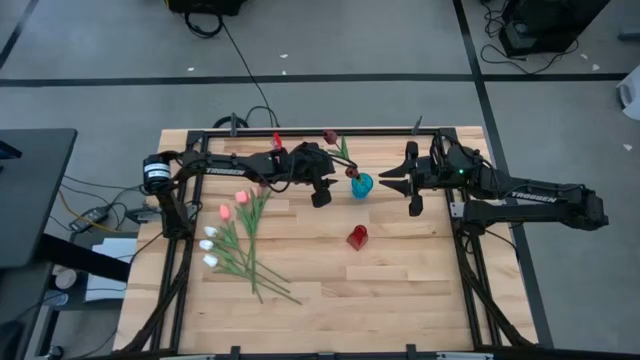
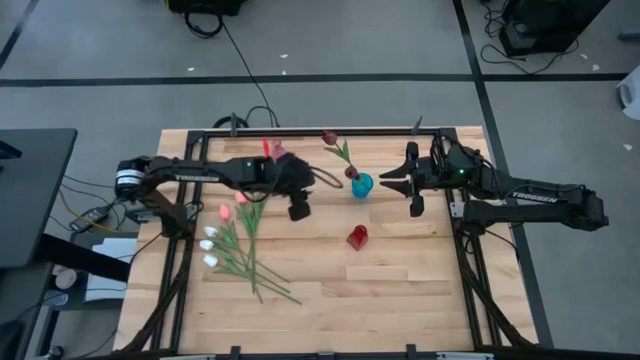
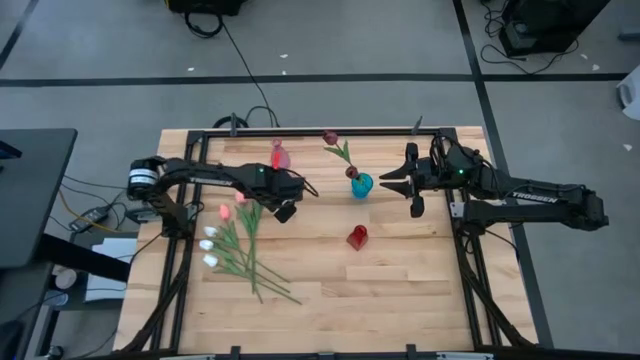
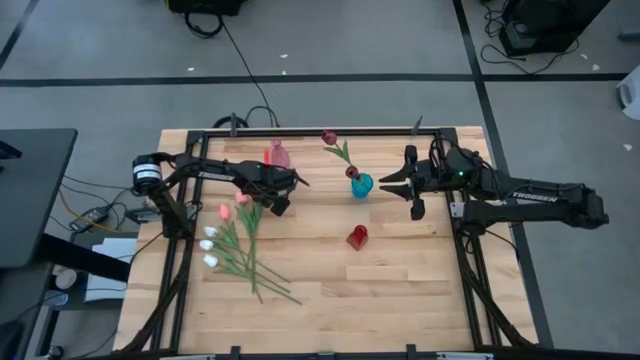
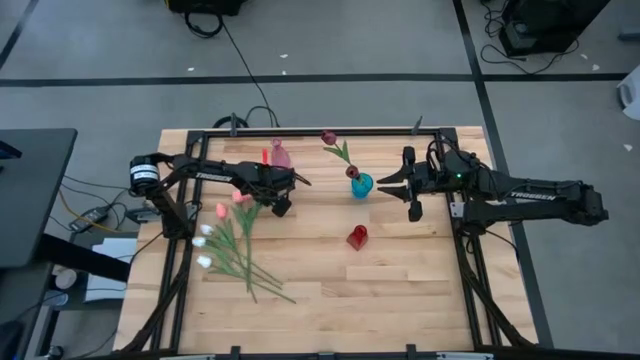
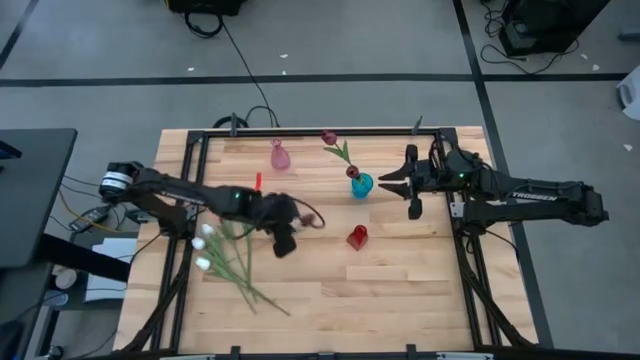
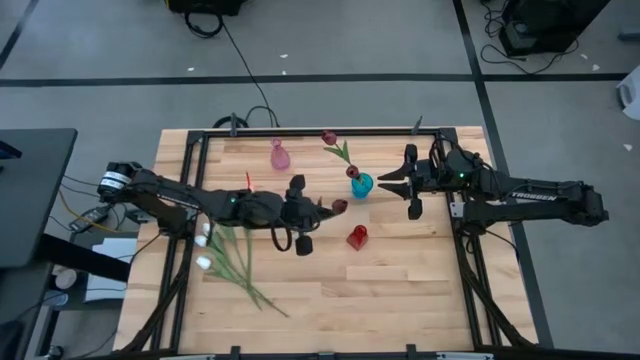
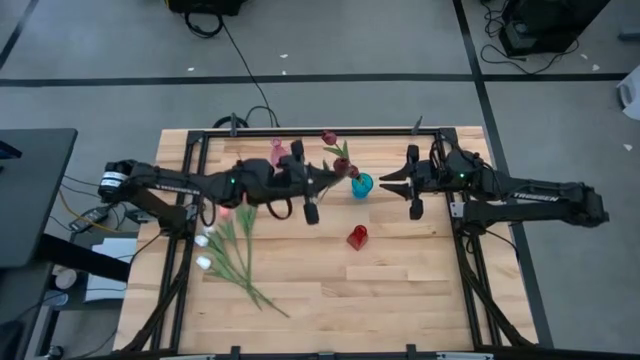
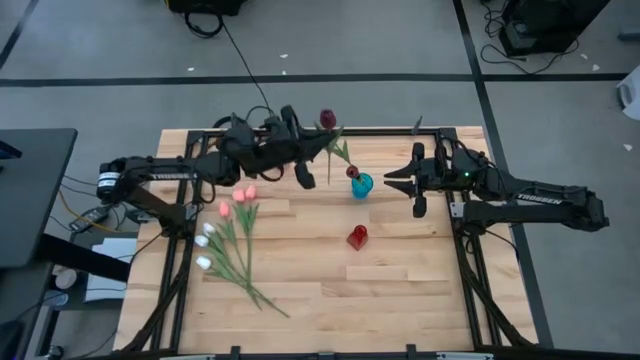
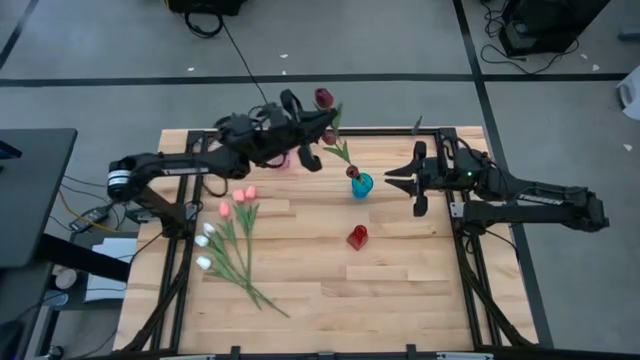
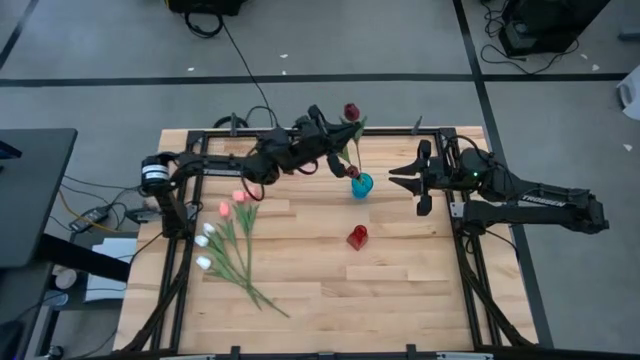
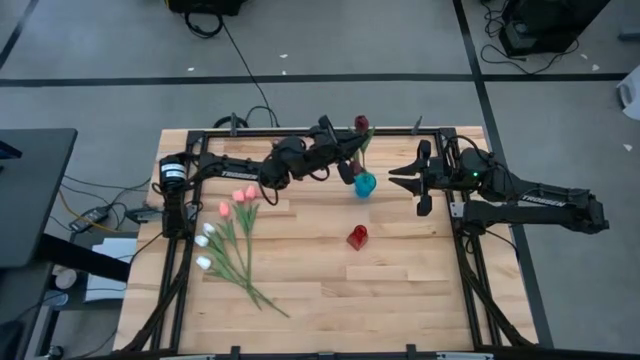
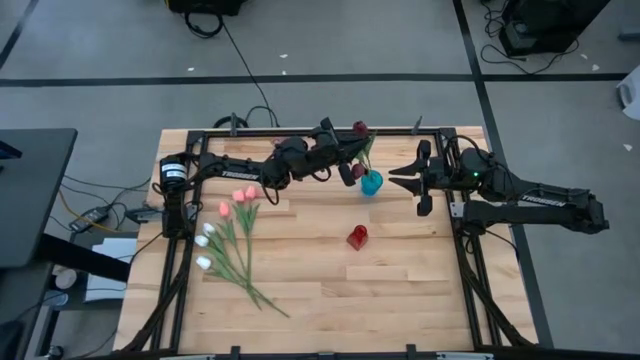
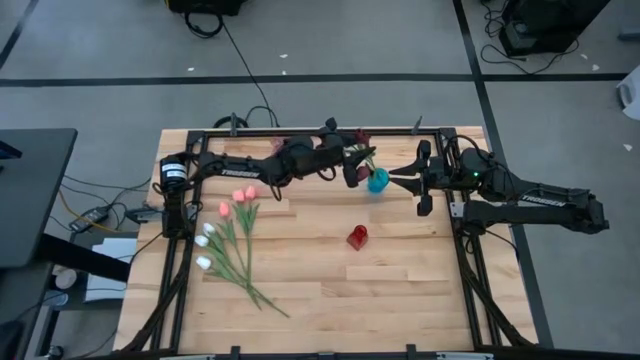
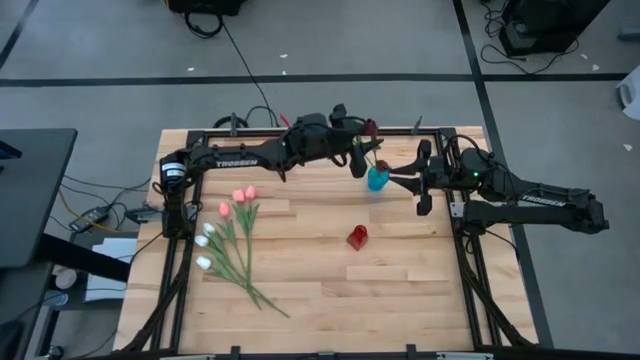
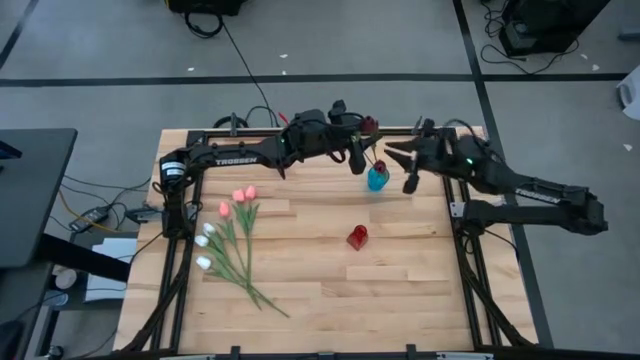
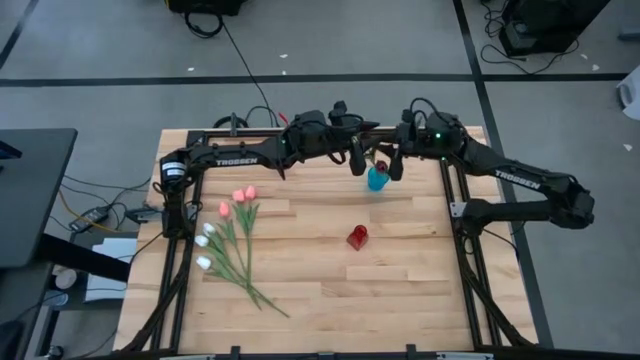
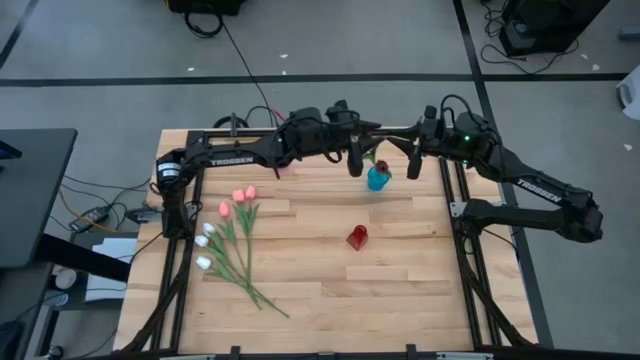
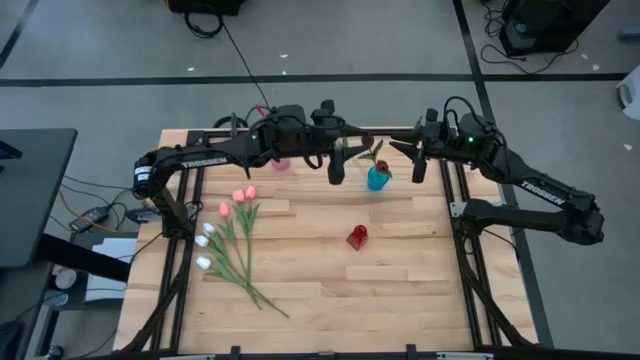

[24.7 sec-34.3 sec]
Task: Sort flowers into vase by color
Put the red tulip into the blue vase

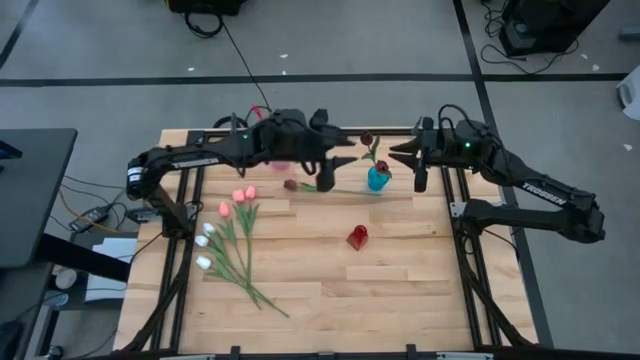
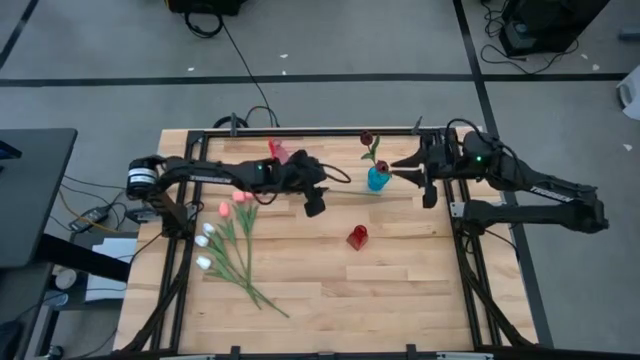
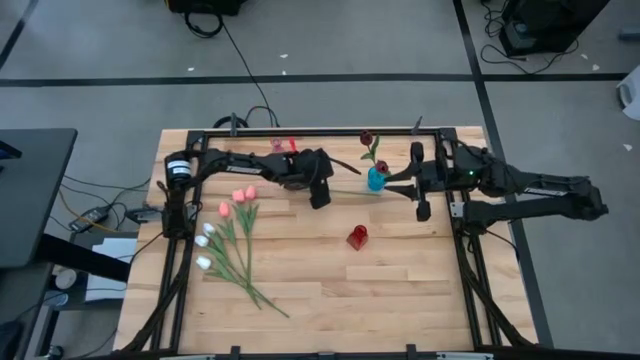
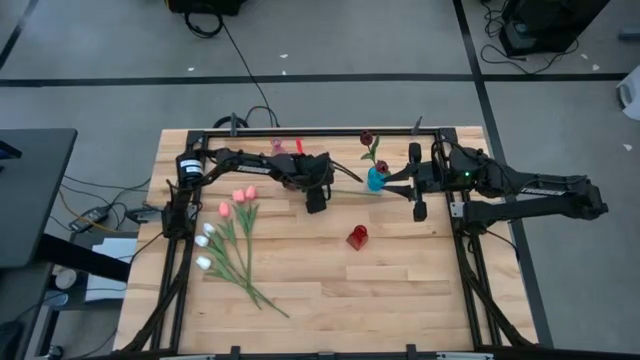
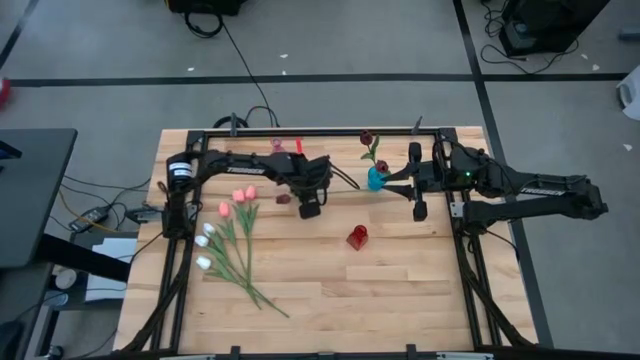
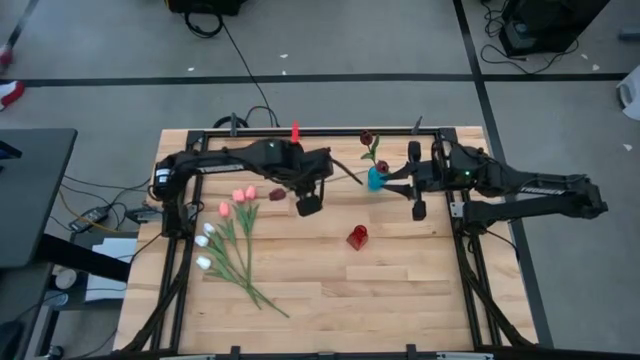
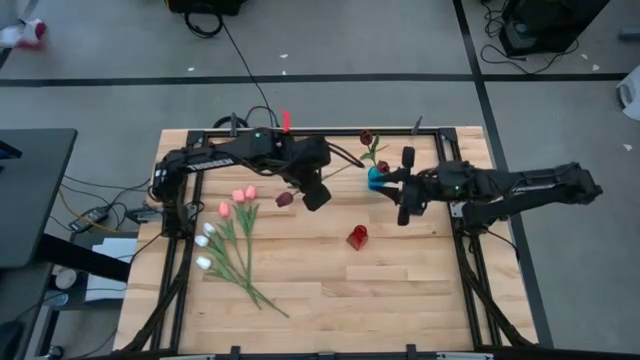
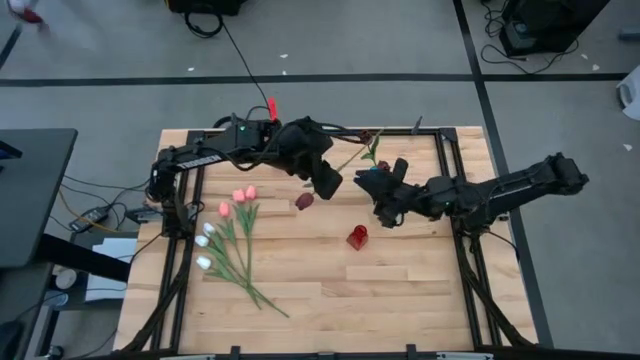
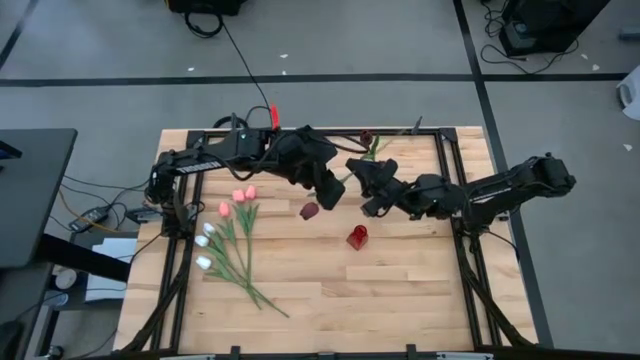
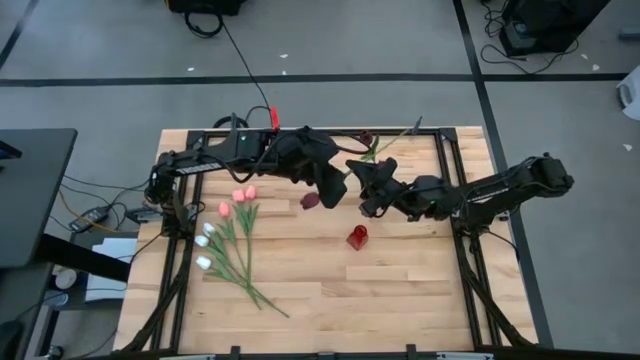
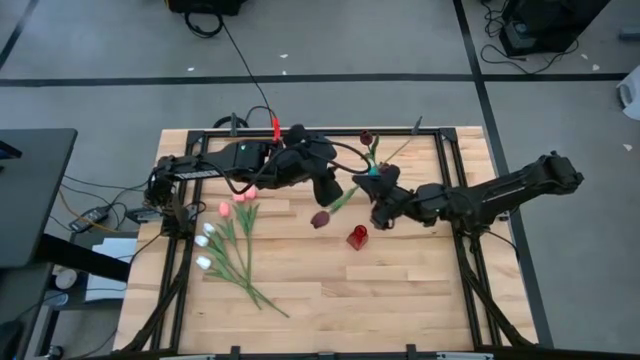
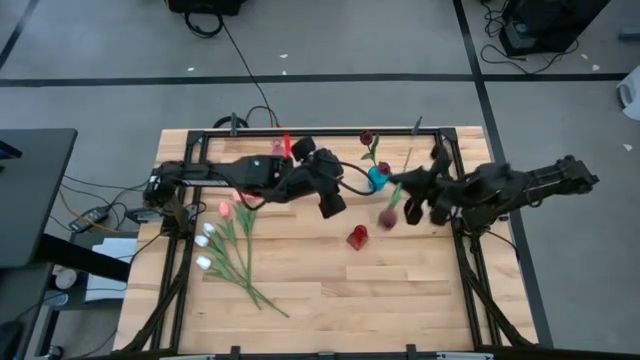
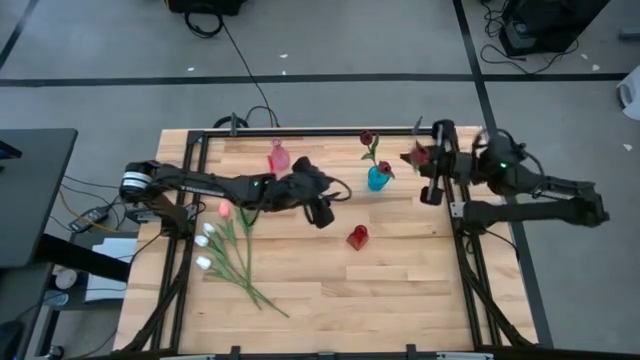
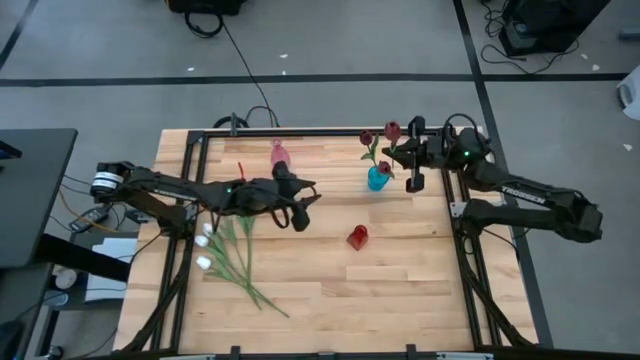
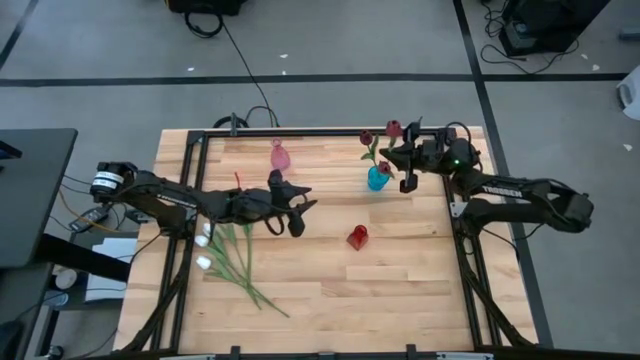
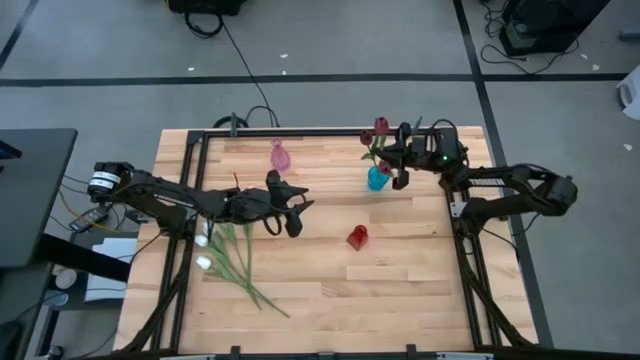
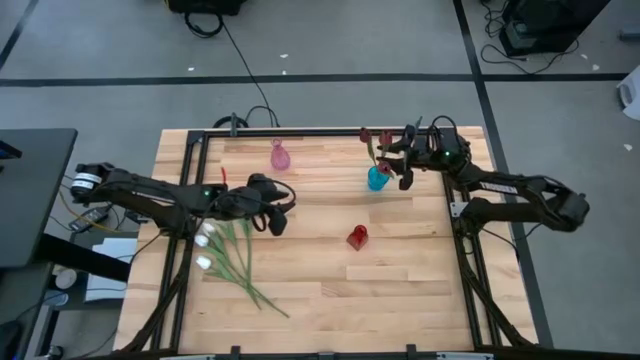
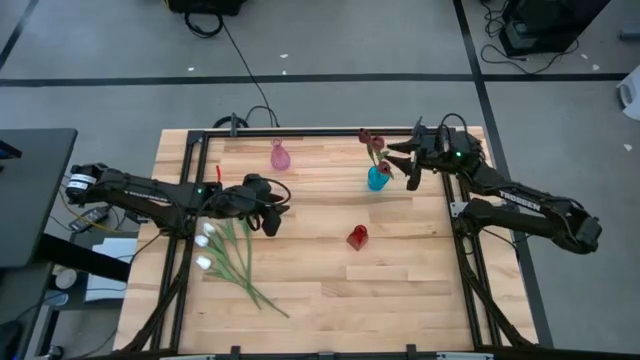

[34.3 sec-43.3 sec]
Put the red tulip into the blue vase

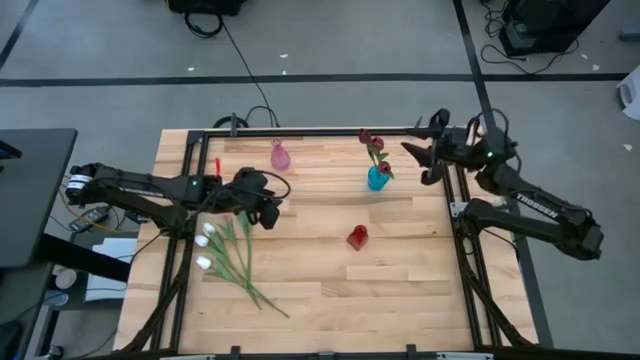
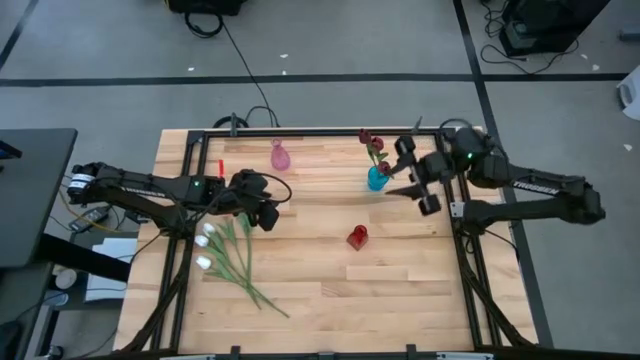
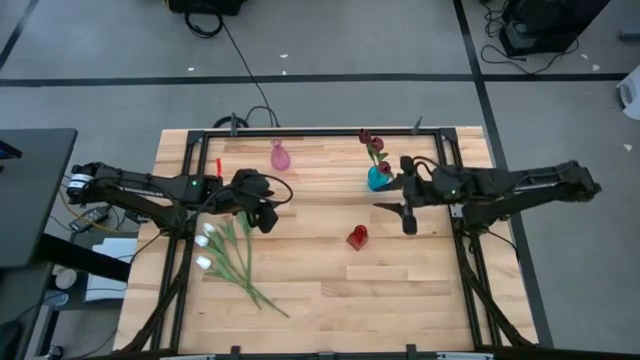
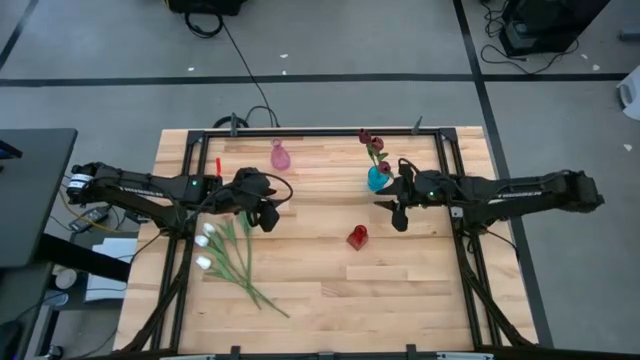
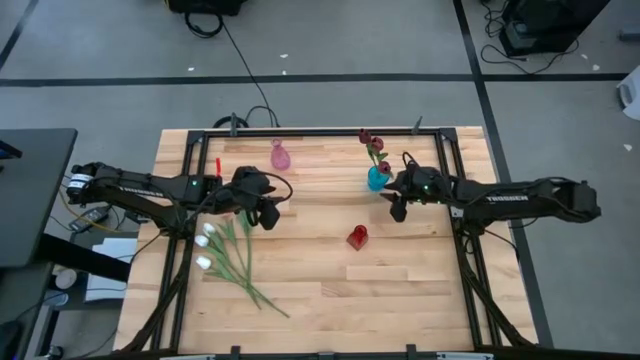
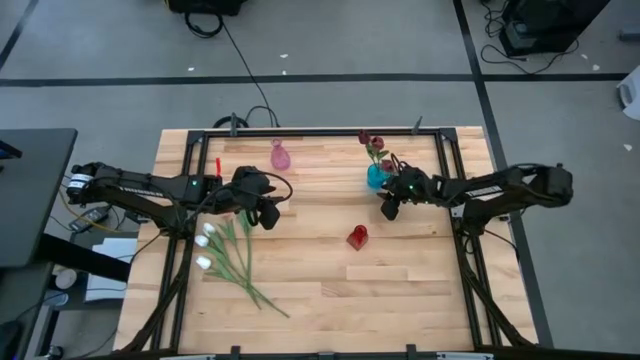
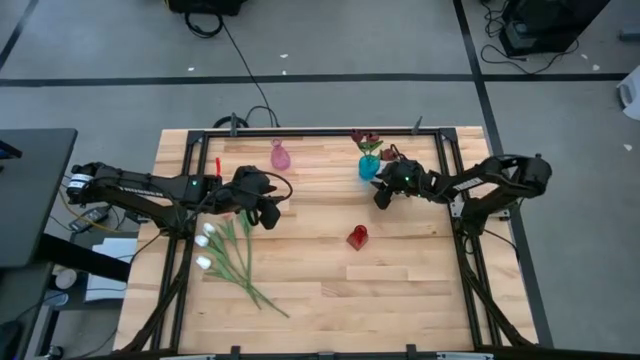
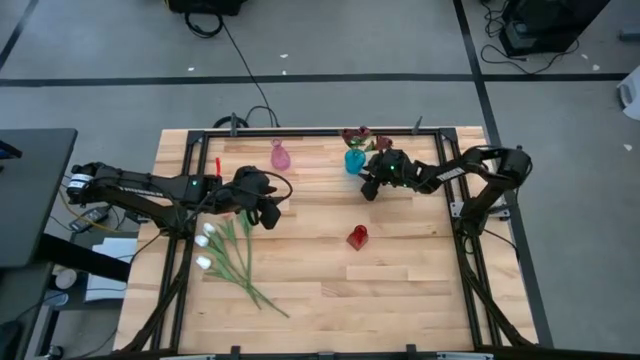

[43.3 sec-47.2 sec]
Adjust the blue vase
